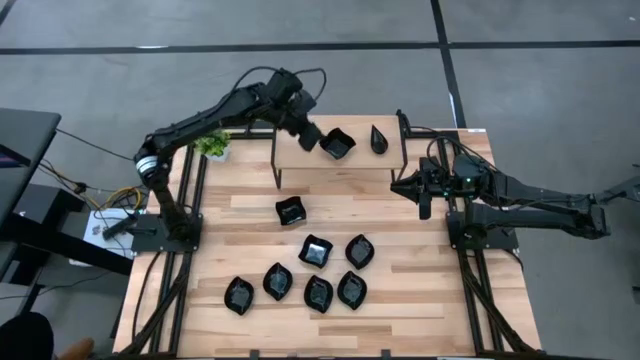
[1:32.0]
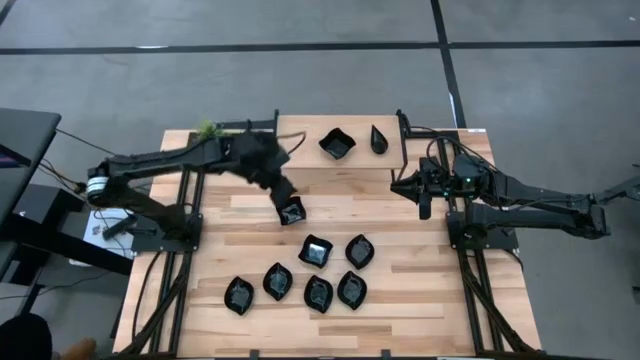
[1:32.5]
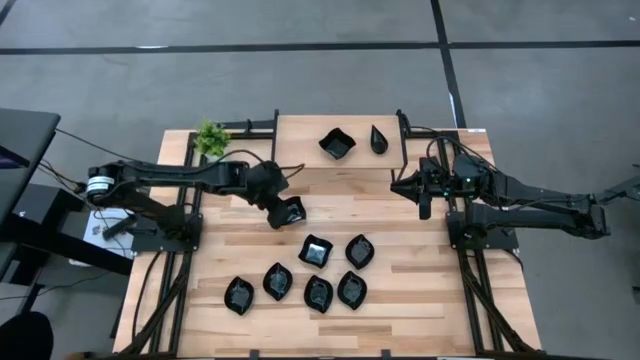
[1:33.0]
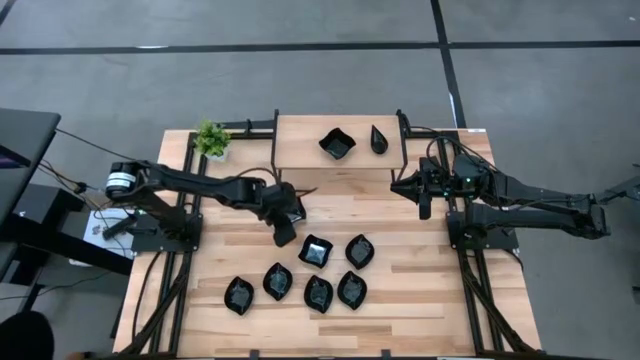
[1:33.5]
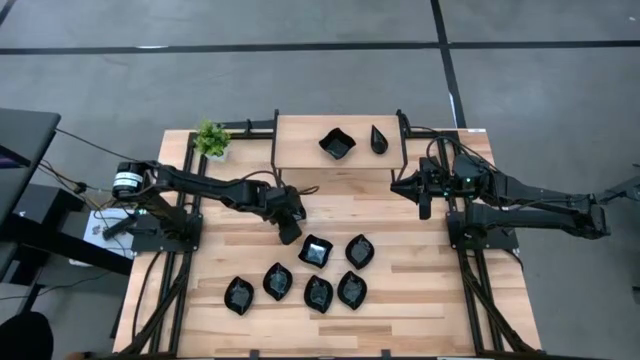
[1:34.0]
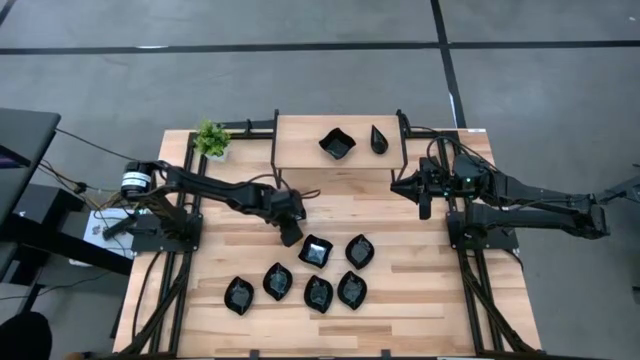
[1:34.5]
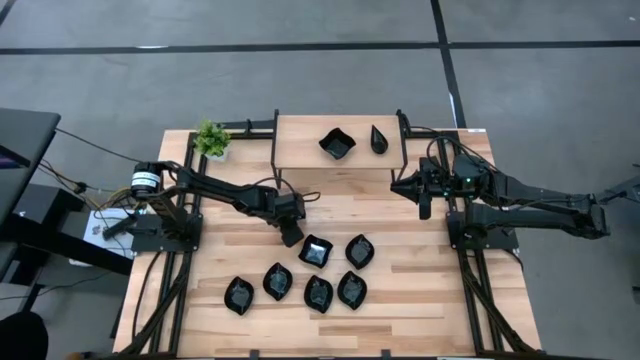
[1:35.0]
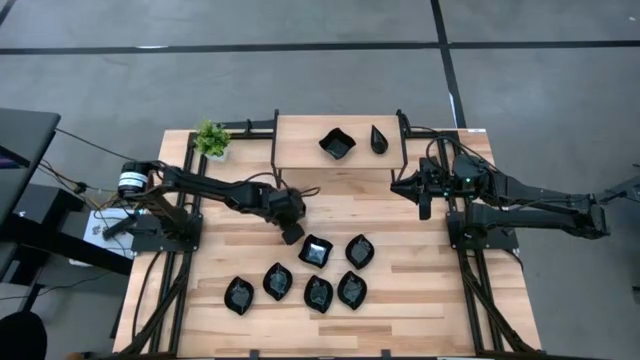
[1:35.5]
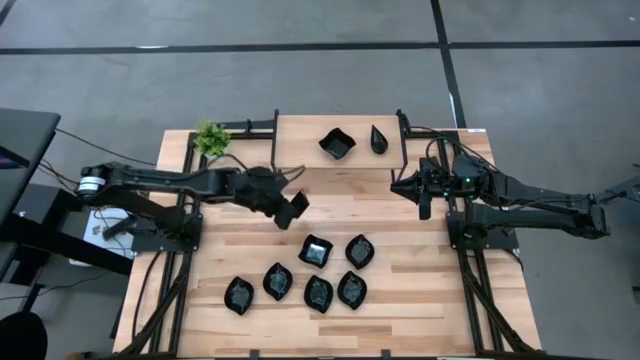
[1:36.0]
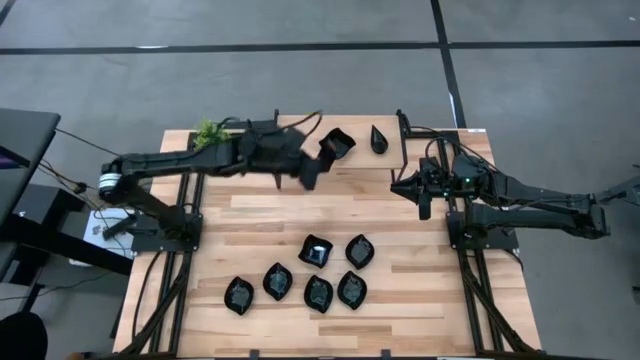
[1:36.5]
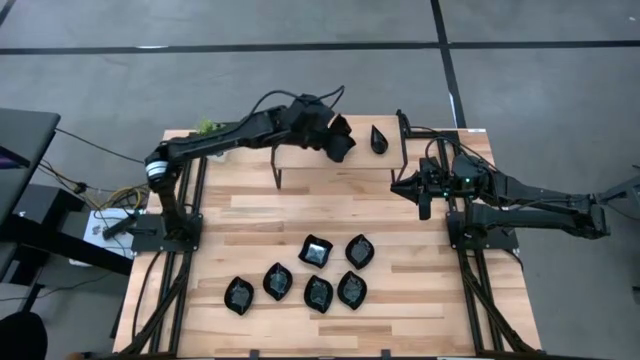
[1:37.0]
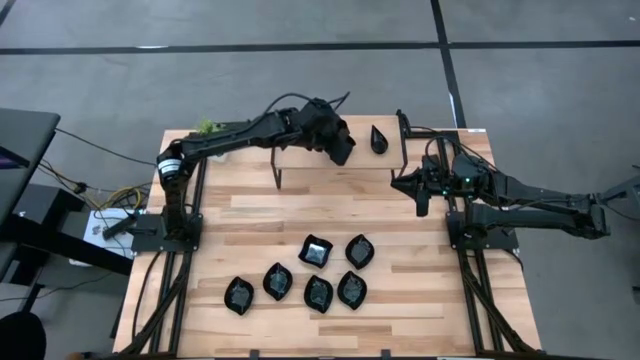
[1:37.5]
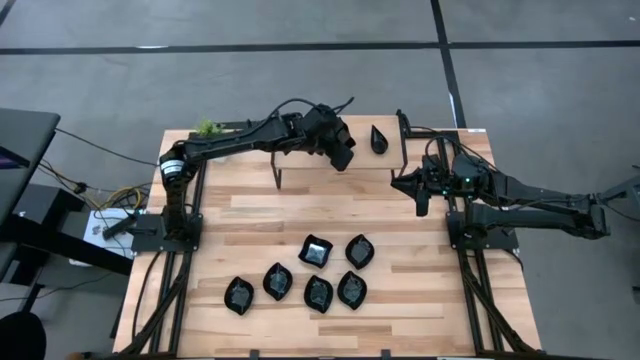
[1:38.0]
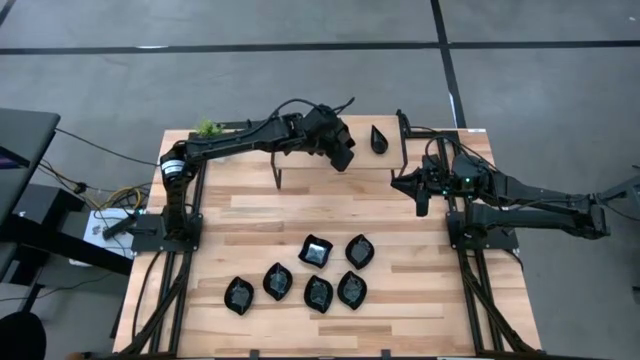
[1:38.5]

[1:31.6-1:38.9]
Task: Pick & Place Mini shaped plates
Stack the distorted square plate on top of the other distorted square plate on the shelf

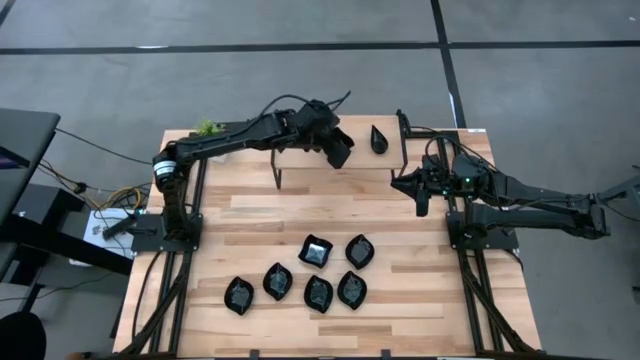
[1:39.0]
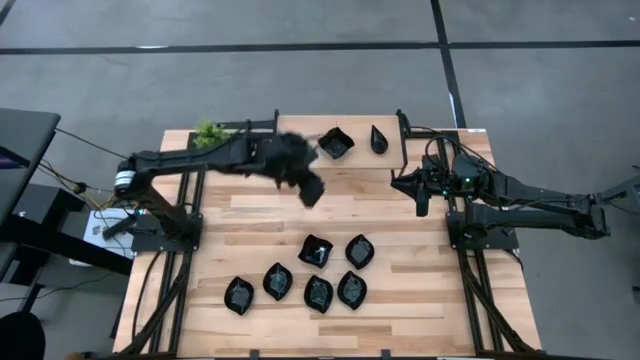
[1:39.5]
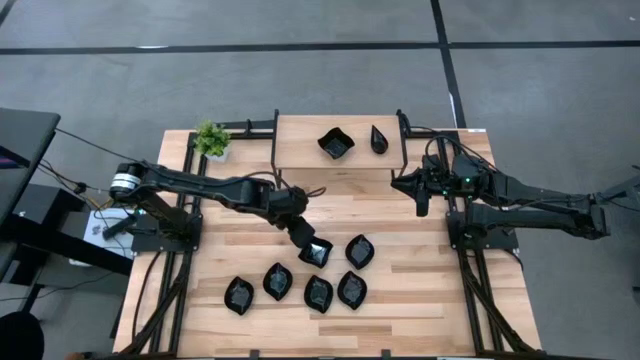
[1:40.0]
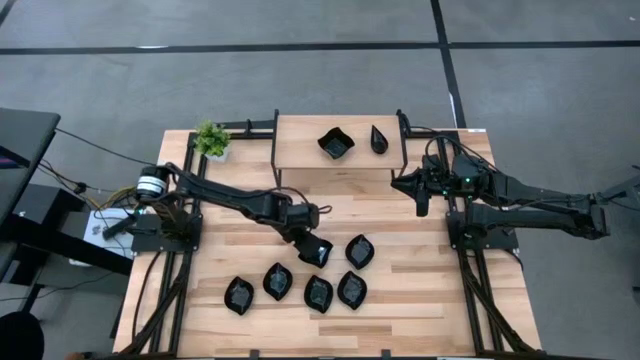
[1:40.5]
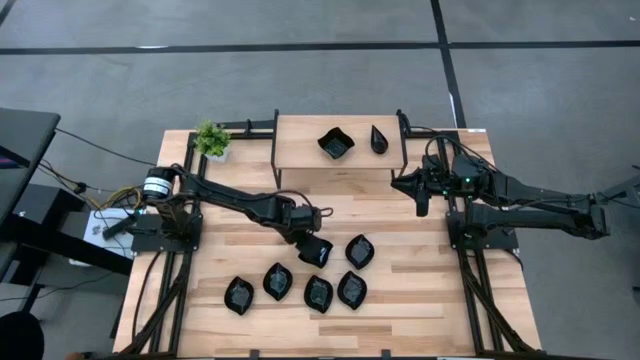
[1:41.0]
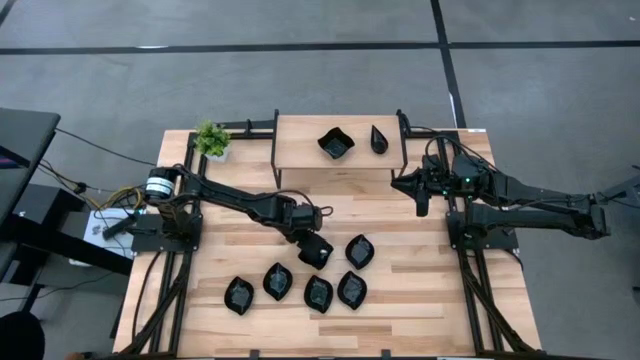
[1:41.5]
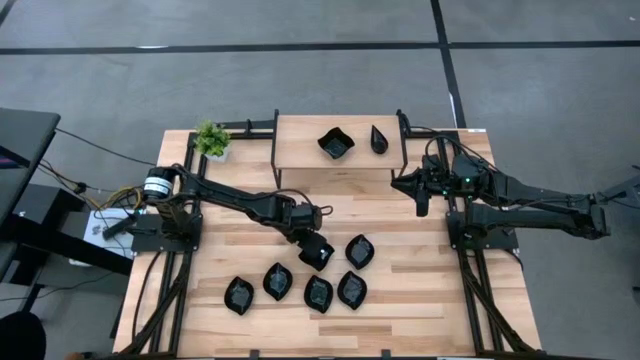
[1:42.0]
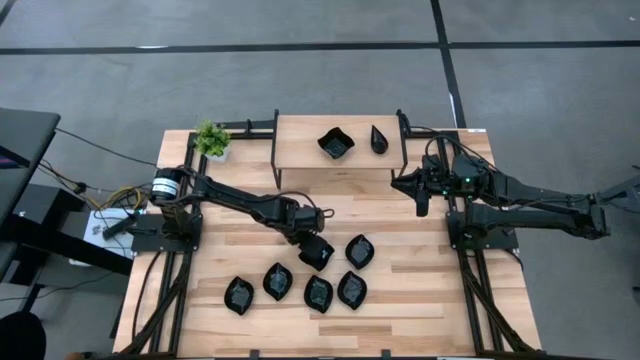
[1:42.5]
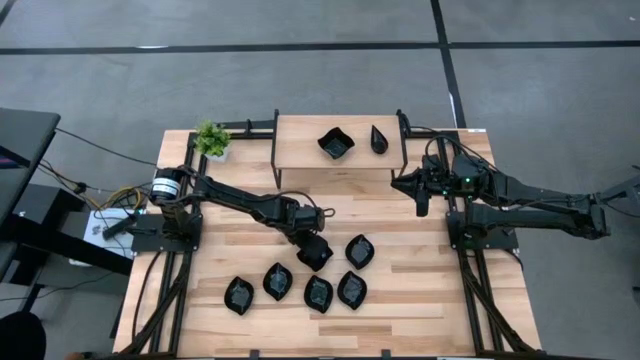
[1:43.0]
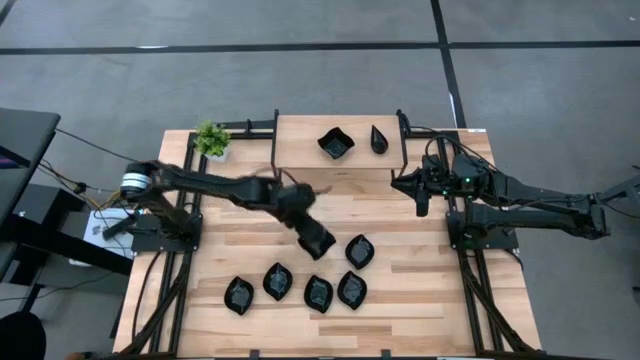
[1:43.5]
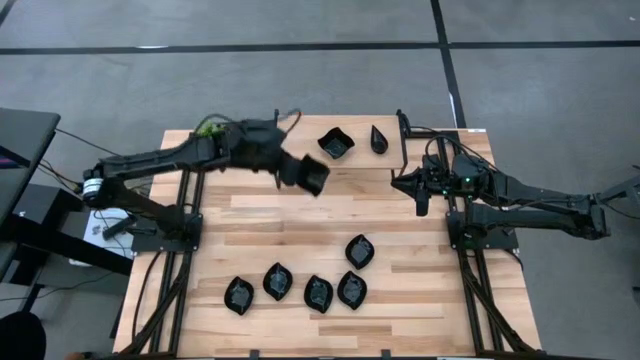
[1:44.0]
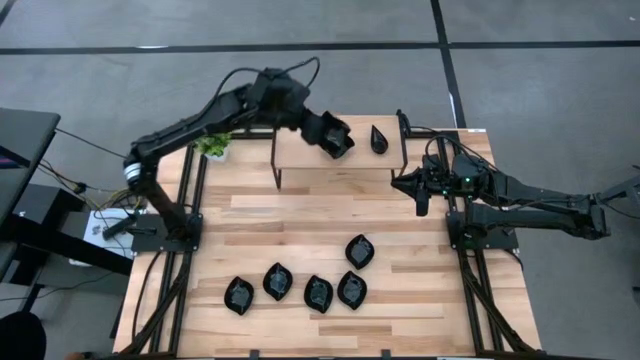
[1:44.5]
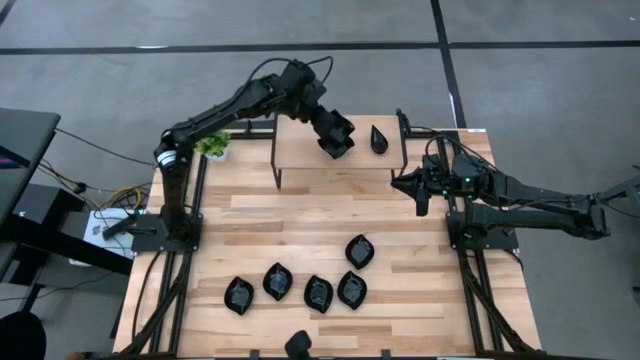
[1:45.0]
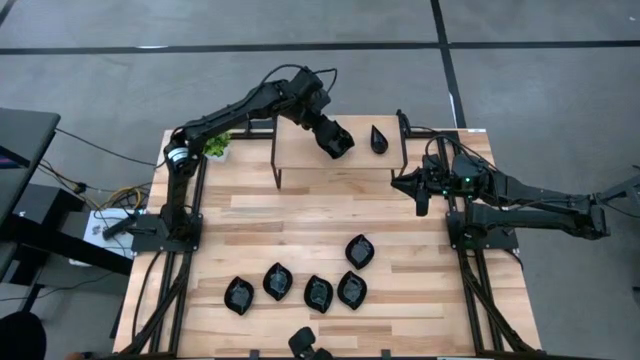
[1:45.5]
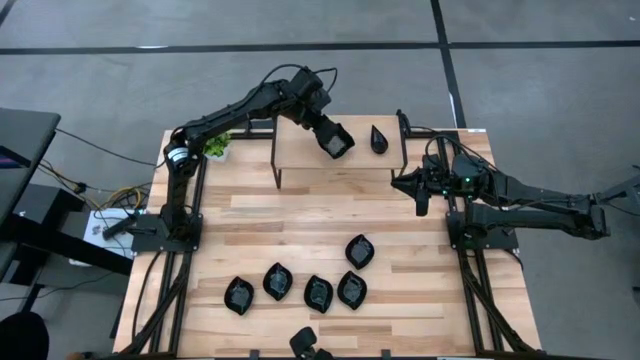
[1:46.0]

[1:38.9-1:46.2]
Stack the distorted square plate on top of the other distorted square plate on the shelf

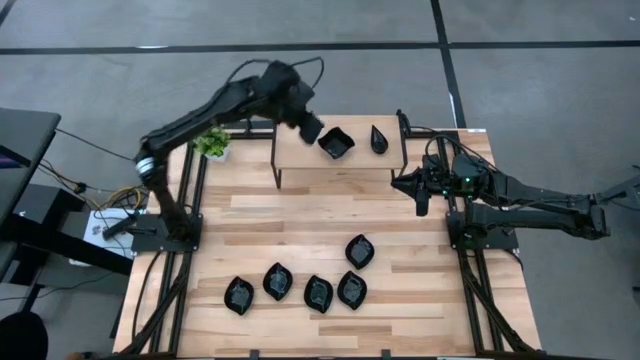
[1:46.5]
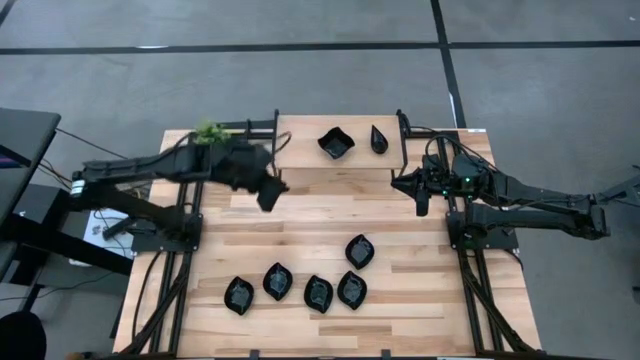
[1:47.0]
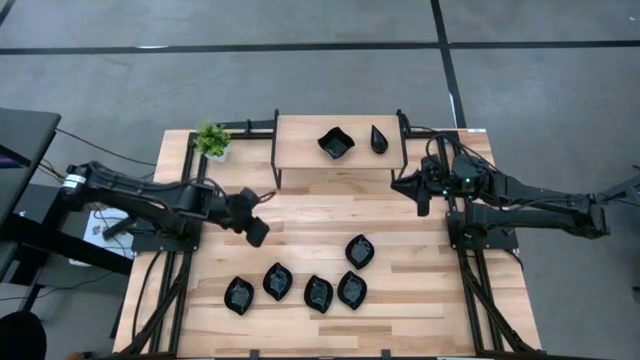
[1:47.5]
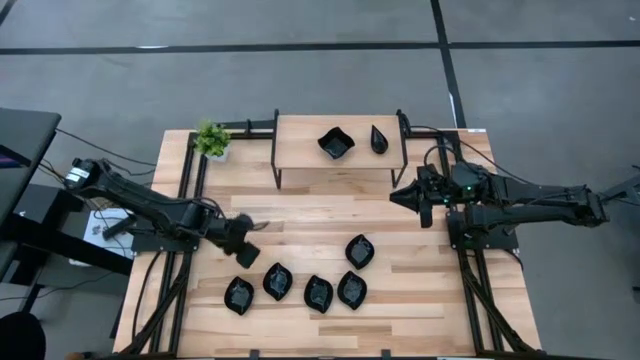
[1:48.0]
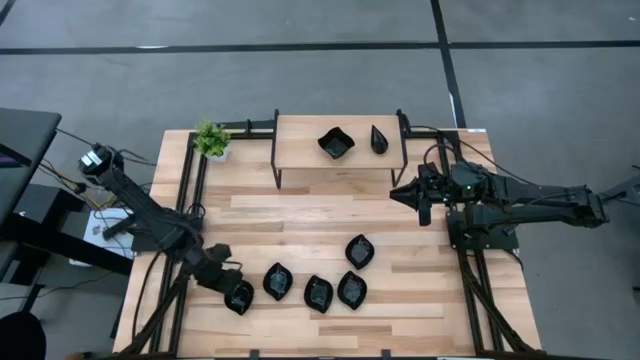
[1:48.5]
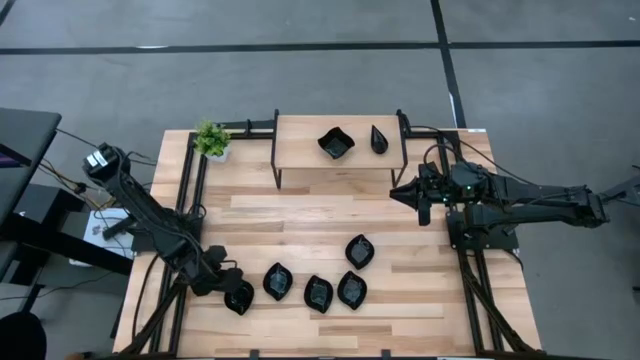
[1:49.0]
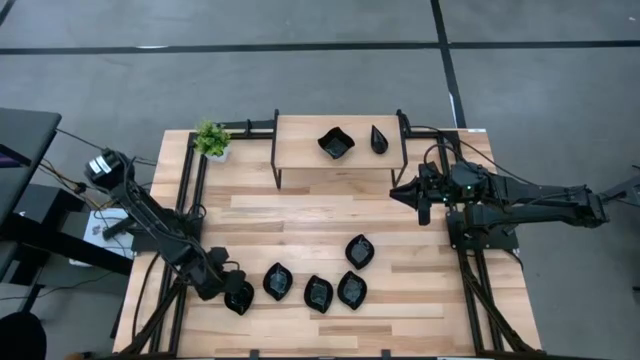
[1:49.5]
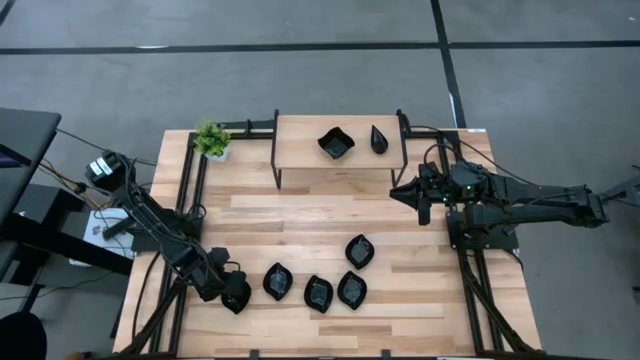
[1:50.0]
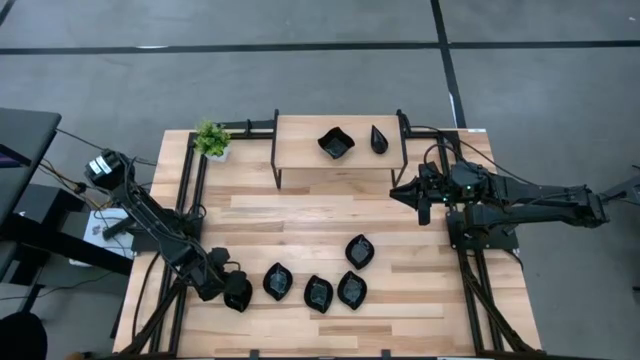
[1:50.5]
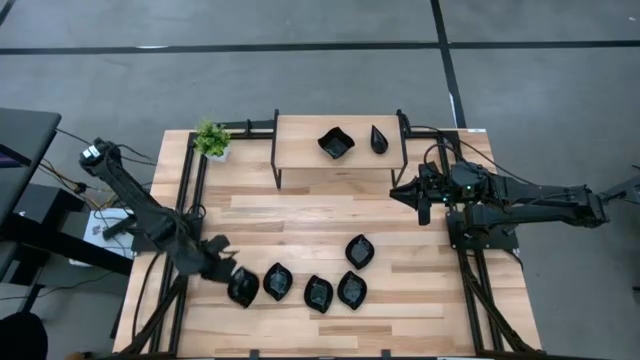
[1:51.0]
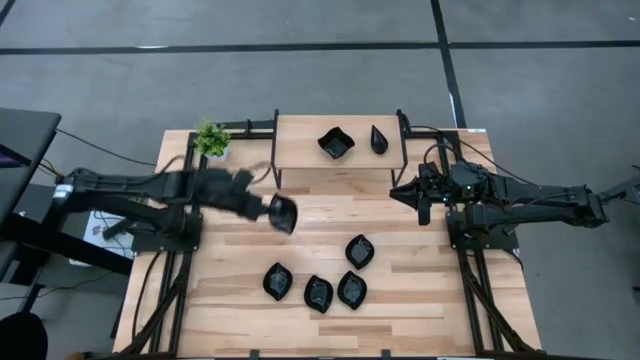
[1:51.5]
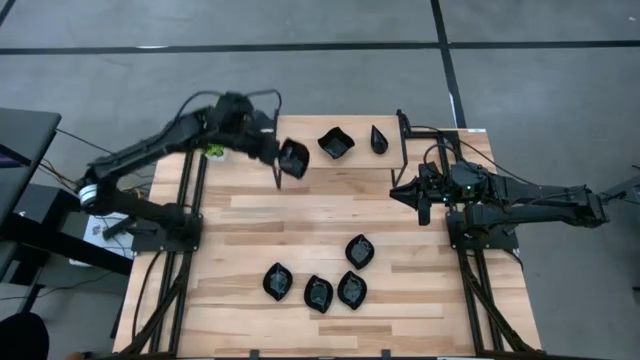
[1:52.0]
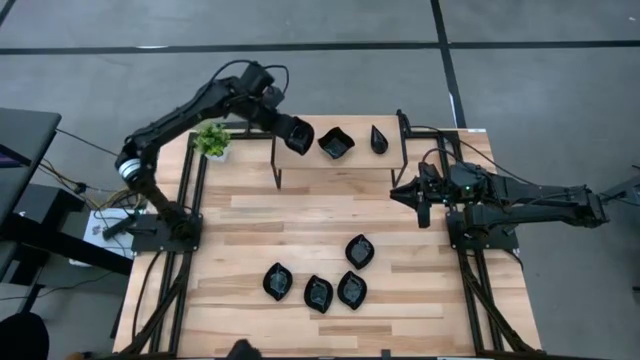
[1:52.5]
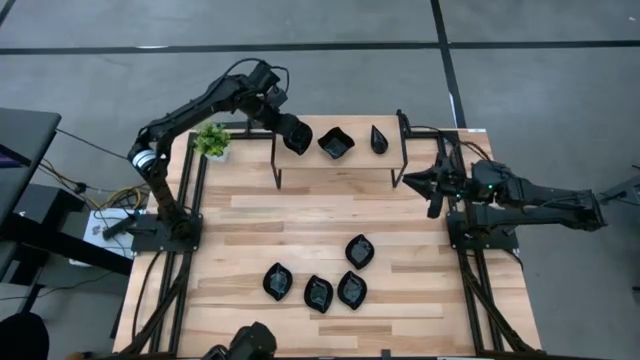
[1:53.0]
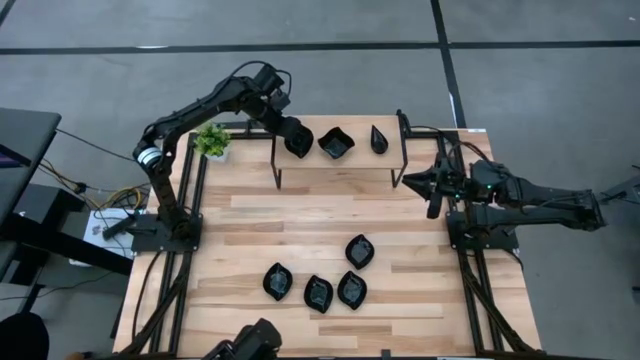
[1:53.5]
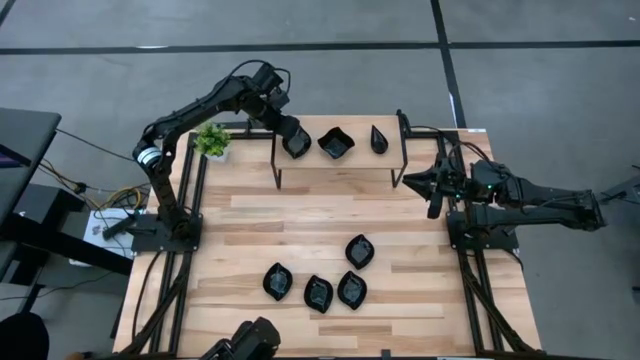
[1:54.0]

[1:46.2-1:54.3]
Put the leaf shaped plate on the shelf
